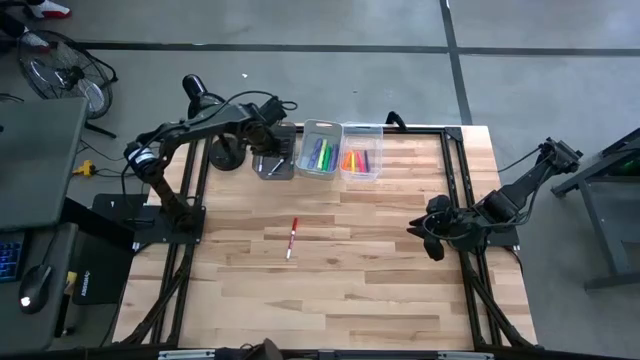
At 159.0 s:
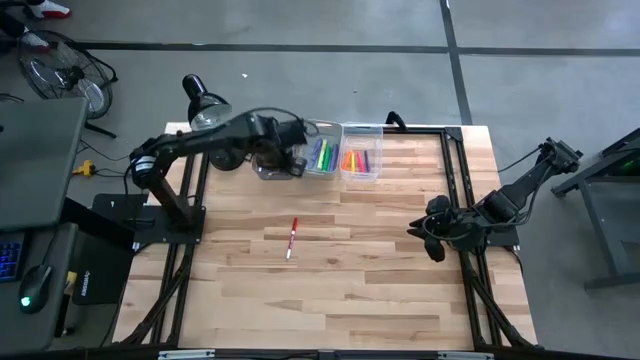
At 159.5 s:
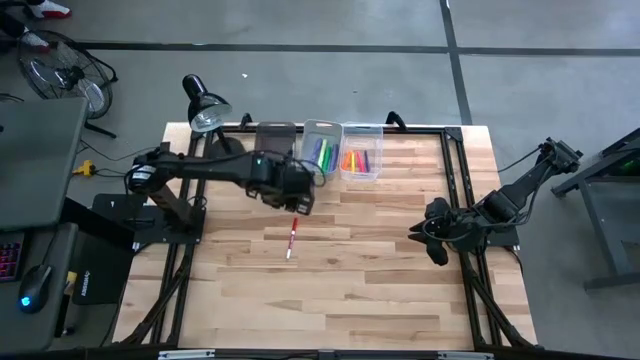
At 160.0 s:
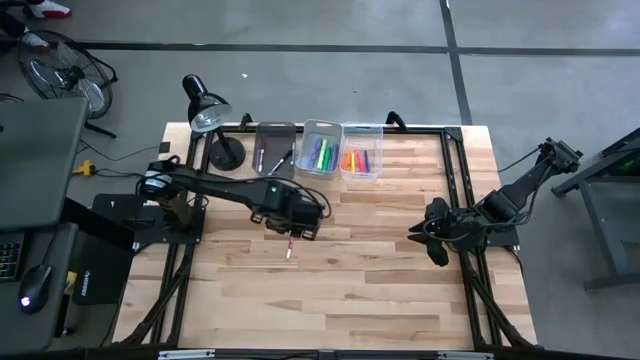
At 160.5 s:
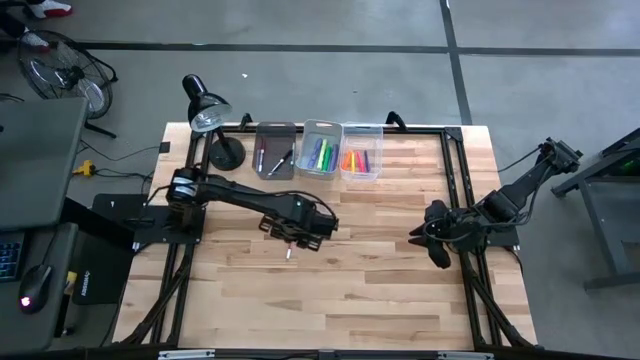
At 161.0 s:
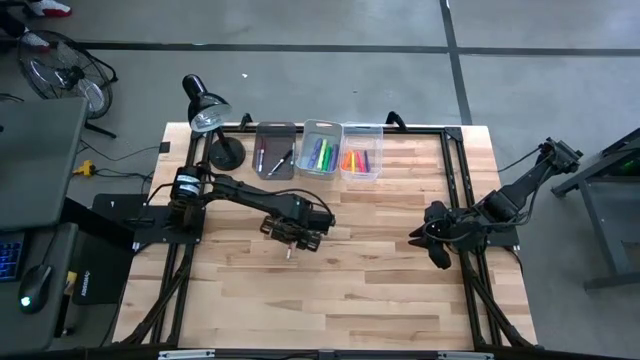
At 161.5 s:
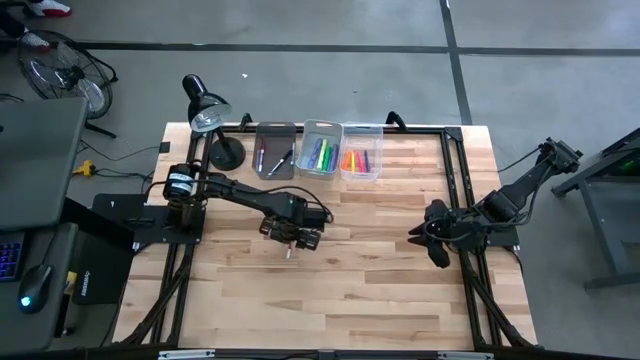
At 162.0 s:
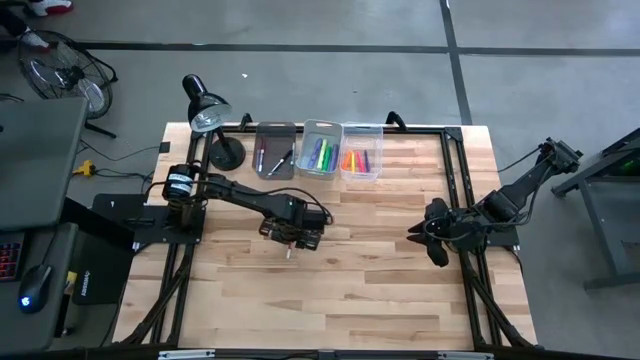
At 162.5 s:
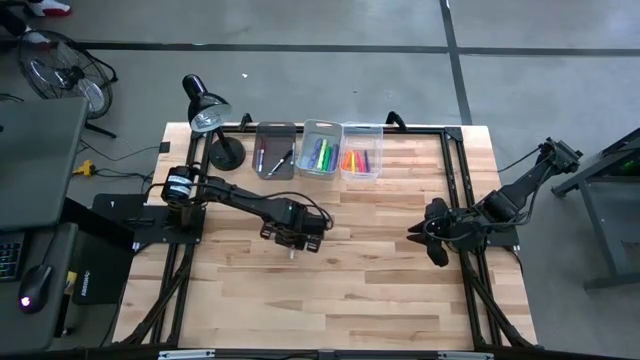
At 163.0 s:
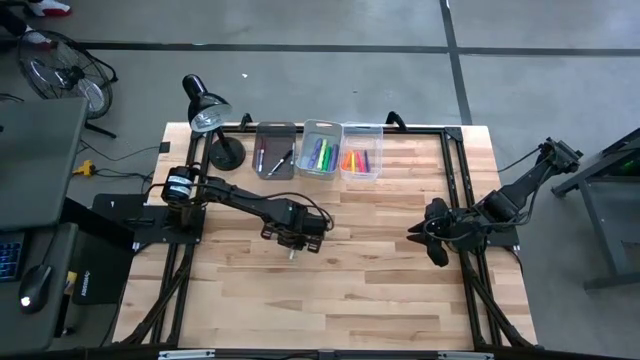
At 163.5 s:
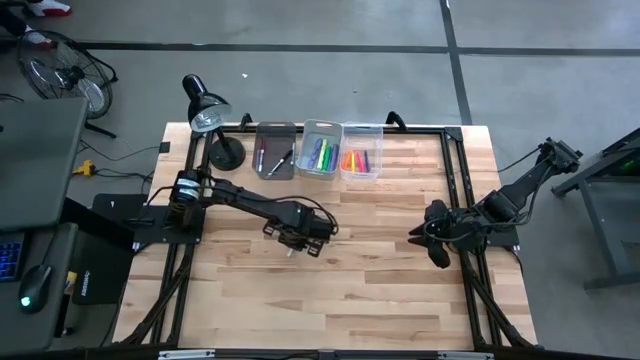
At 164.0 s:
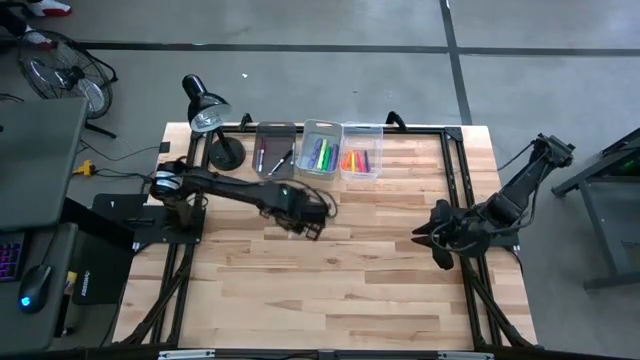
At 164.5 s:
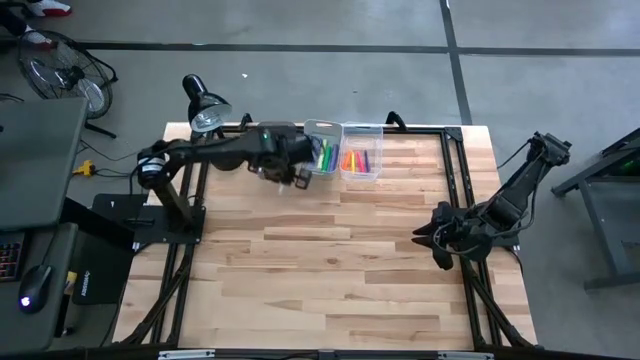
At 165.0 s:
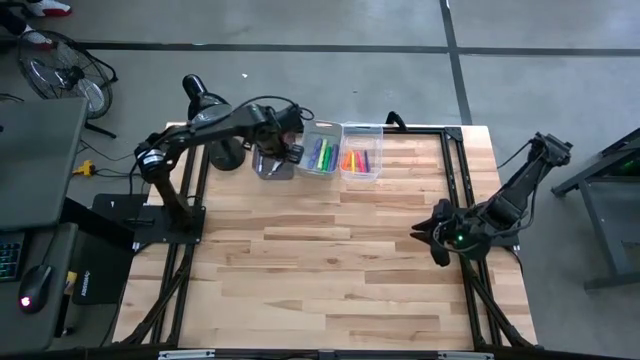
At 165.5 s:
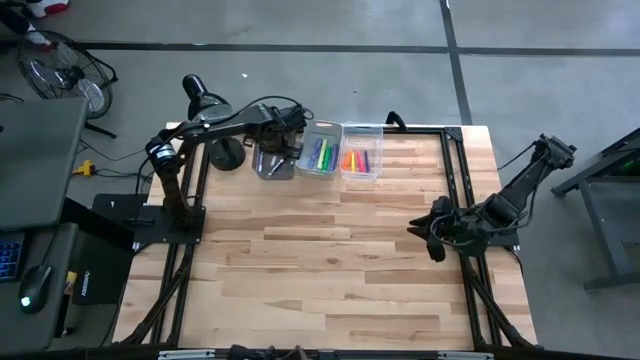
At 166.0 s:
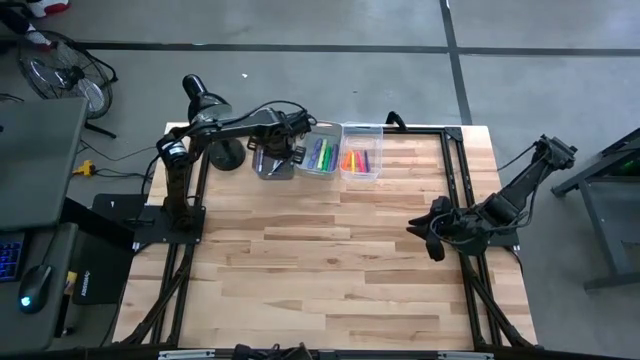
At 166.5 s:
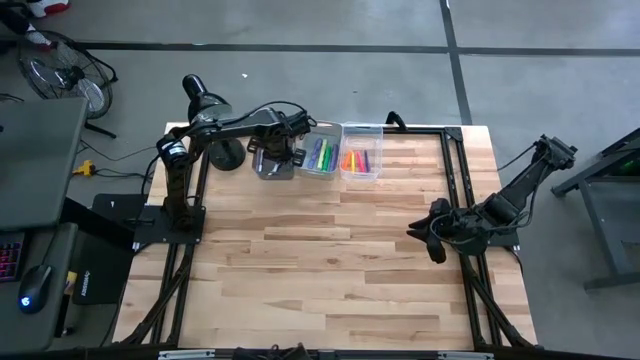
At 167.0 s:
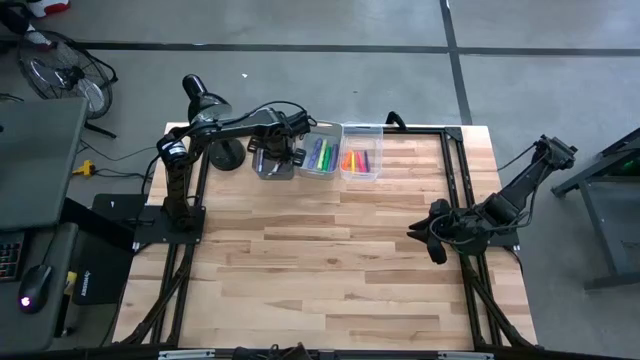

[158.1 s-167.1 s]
Task: Pick & Place Markers
Put the red marker into the black bin

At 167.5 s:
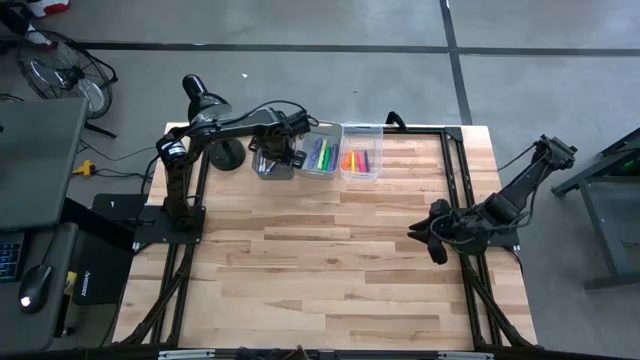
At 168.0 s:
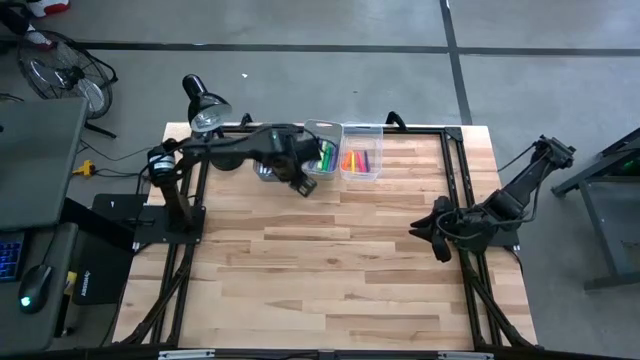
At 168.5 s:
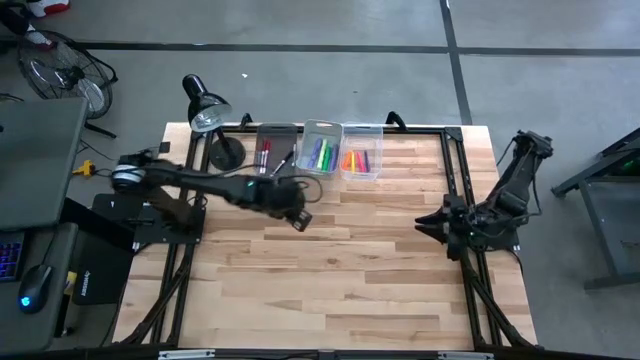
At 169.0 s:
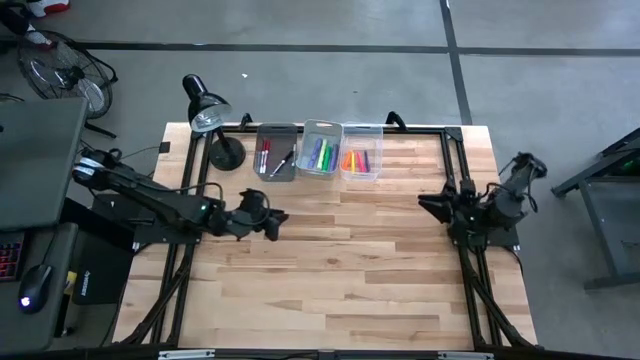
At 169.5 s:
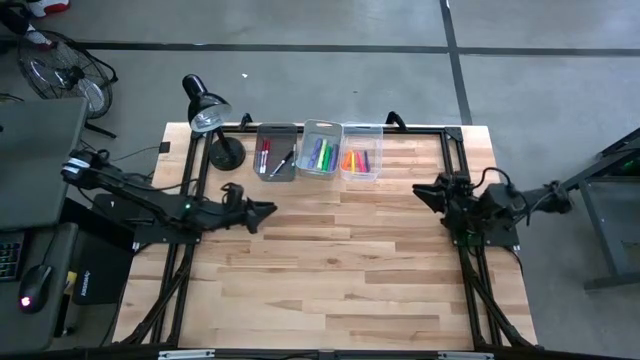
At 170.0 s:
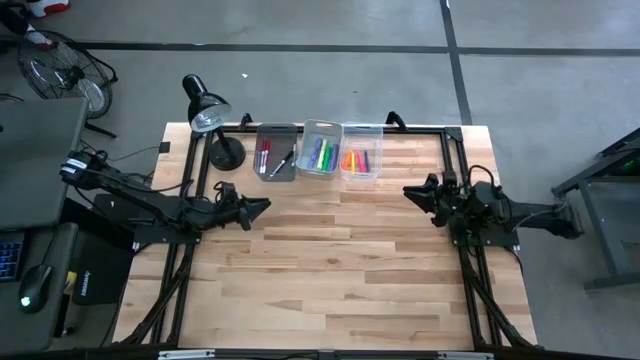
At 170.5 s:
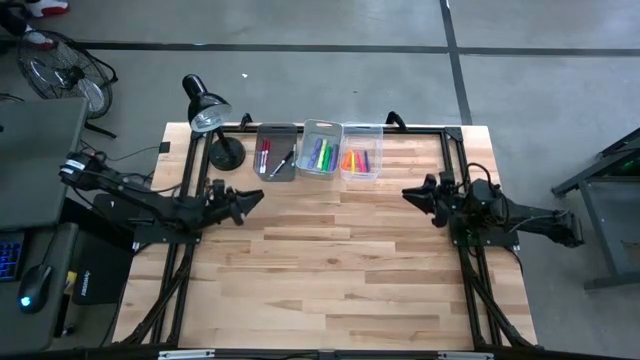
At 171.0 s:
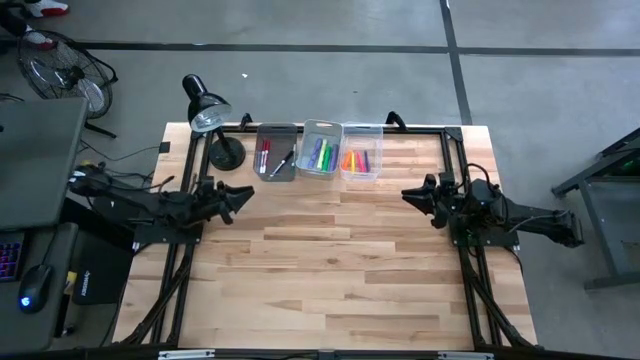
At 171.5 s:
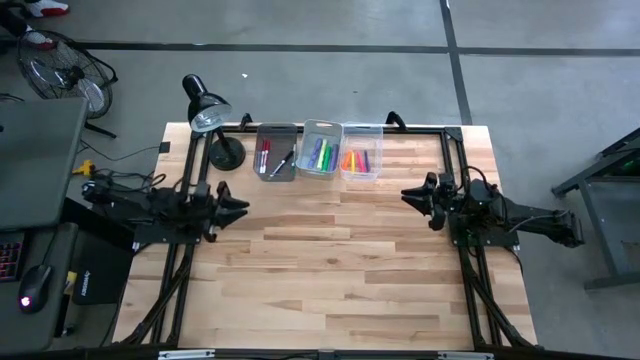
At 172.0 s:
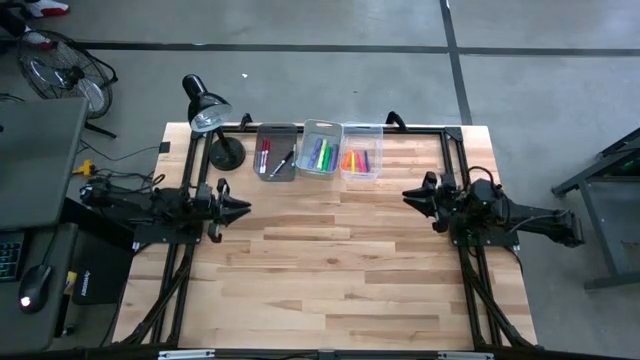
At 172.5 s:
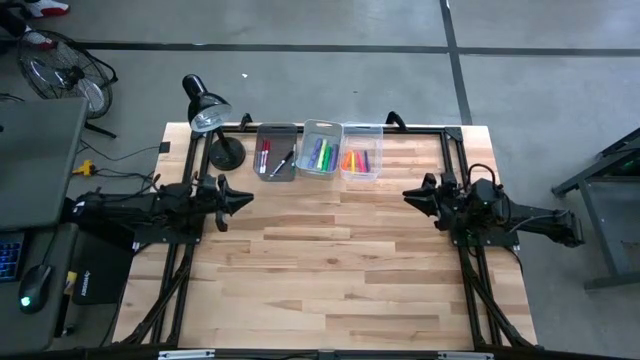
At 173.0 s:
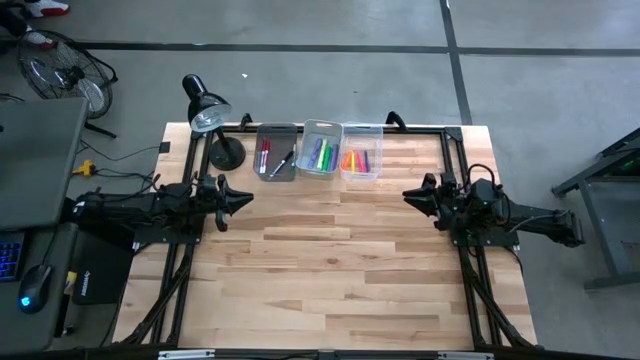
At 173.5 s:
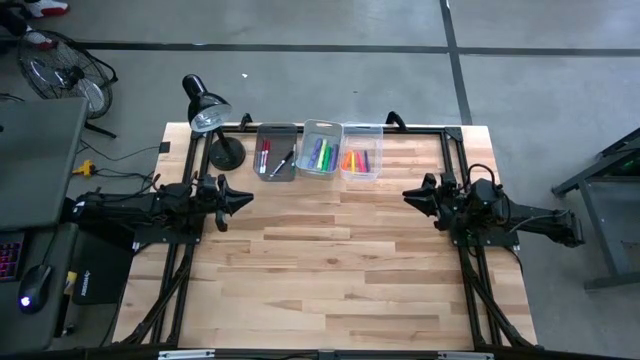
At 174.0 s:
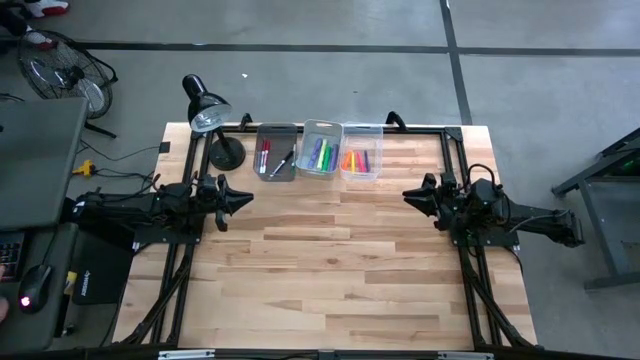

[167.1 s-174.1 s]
Return to Home Position

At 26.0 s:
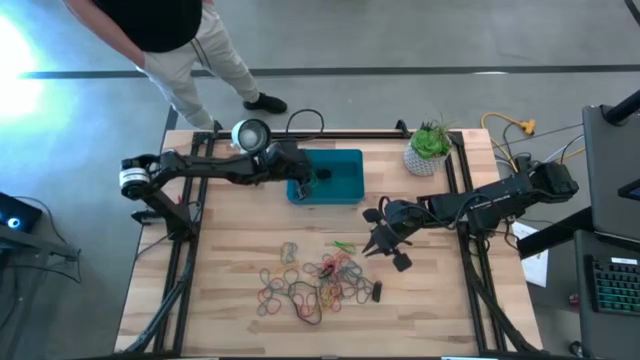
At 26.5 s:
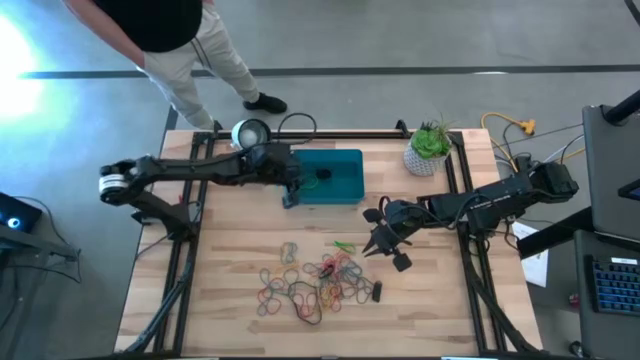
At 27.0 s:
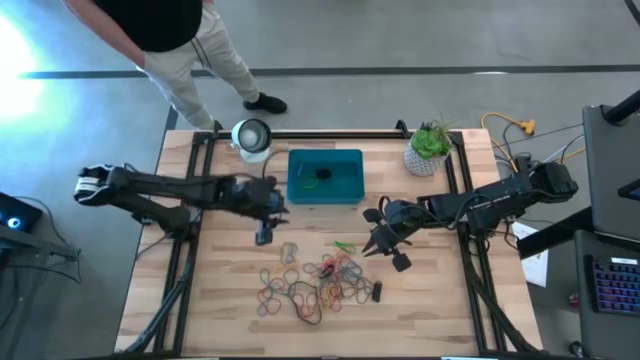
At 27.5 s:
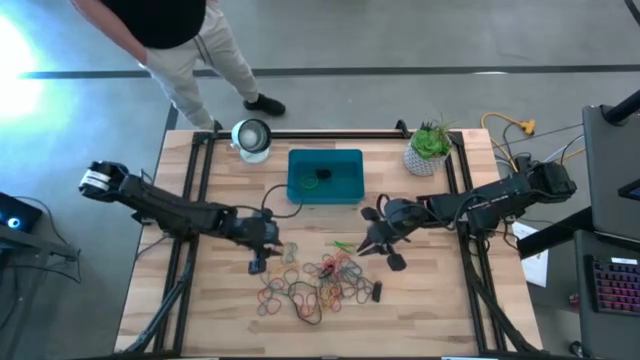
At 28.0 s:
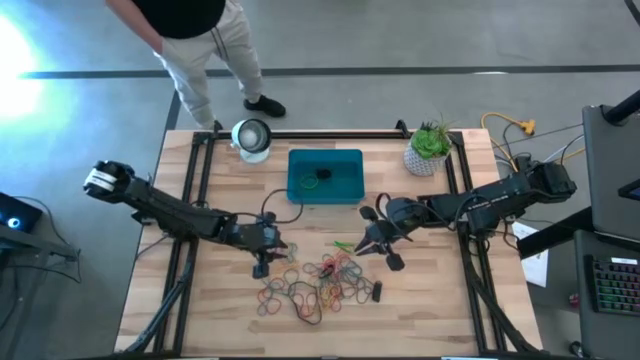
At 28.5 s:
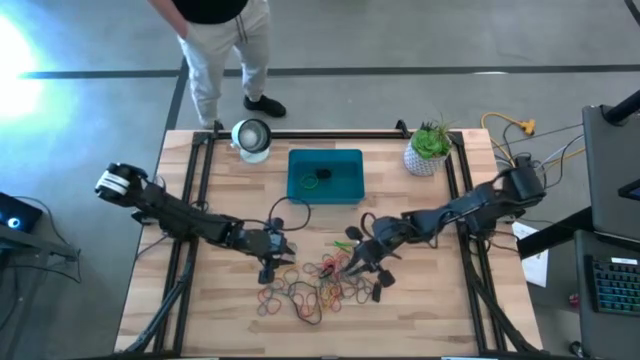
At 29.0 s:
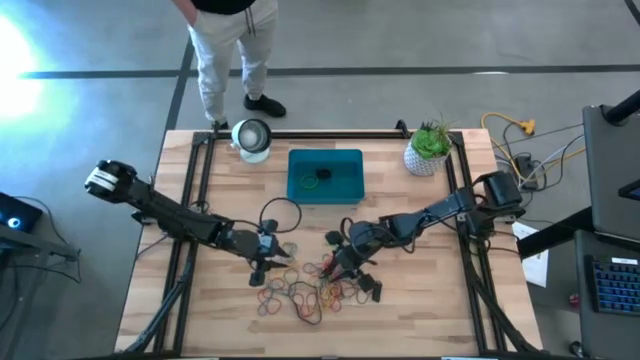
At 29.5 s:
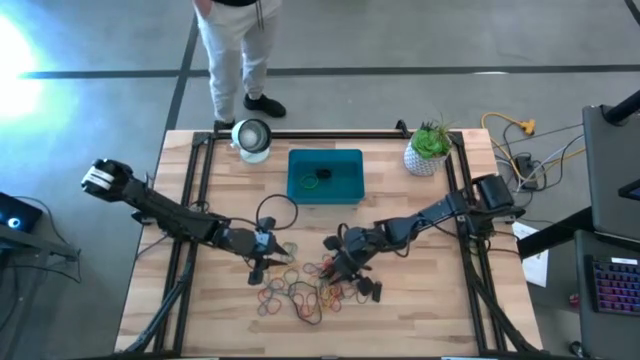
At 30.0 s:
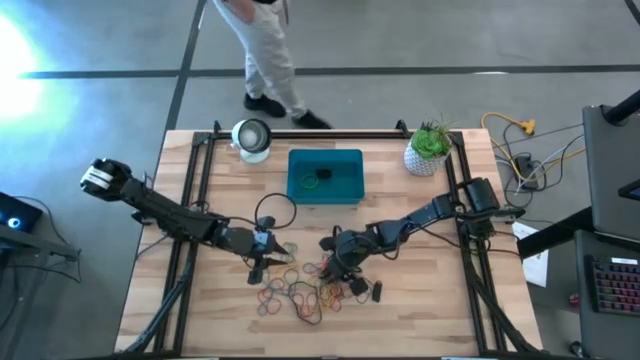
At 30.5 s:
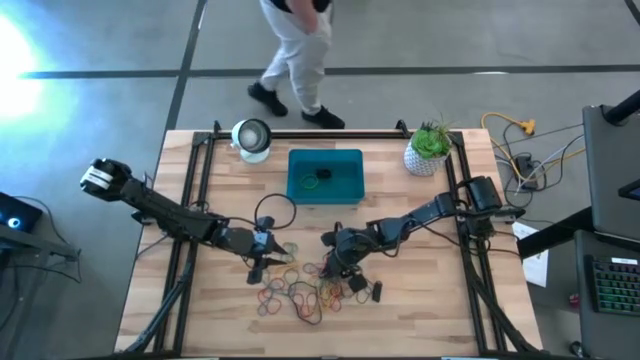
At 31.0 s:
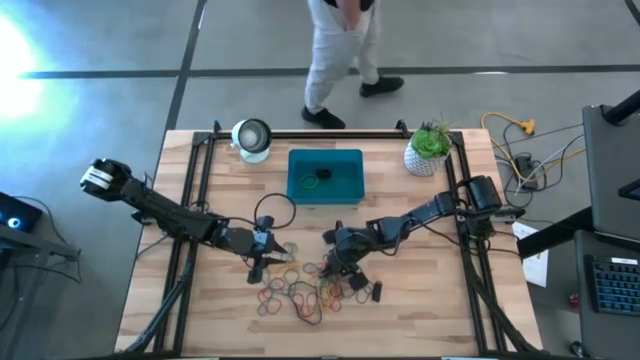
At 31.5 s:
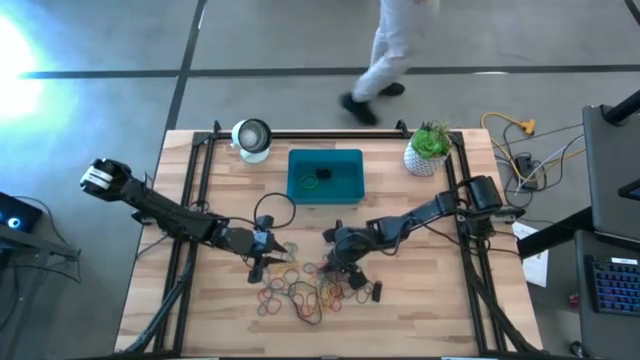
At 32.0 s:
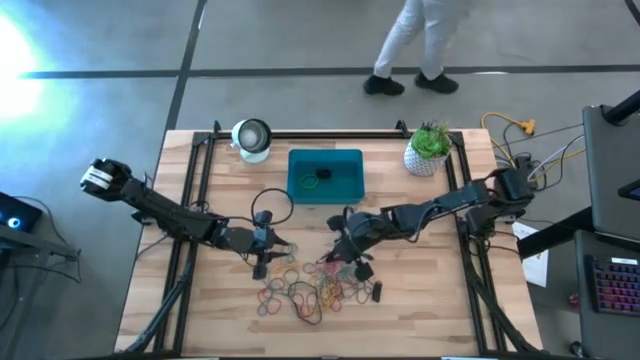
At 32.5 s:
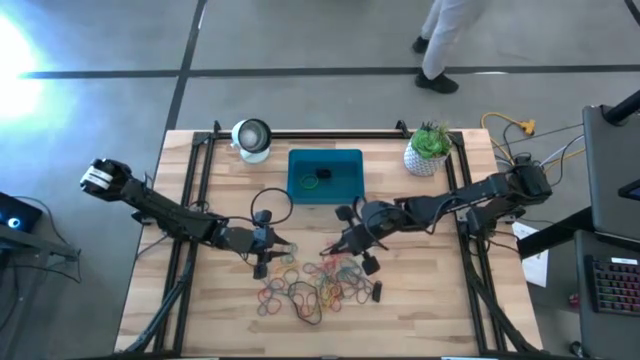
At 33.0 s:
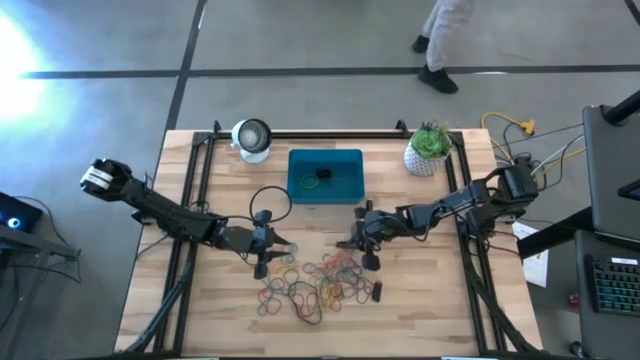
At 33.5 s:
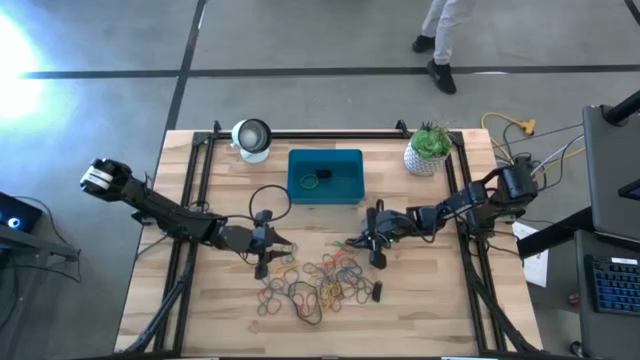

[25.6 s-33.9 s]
Task: Pick and place rubber bands into bin
Put the black rubber band into the bin
